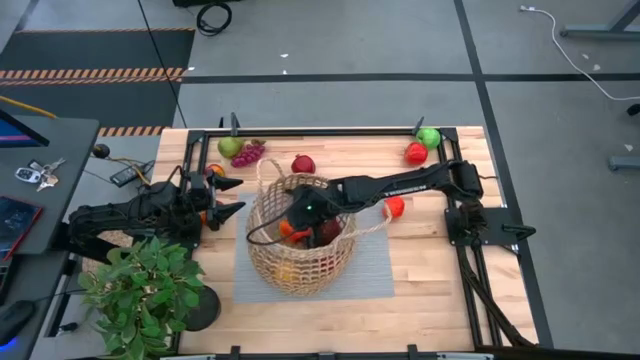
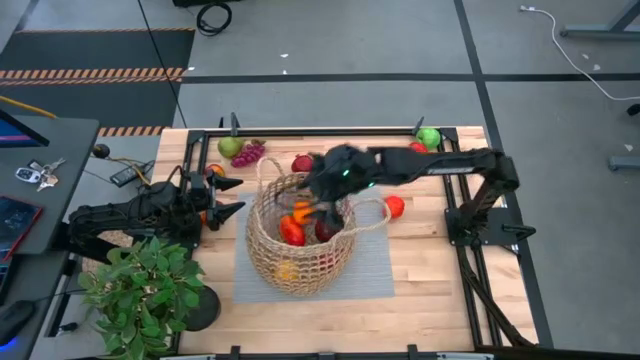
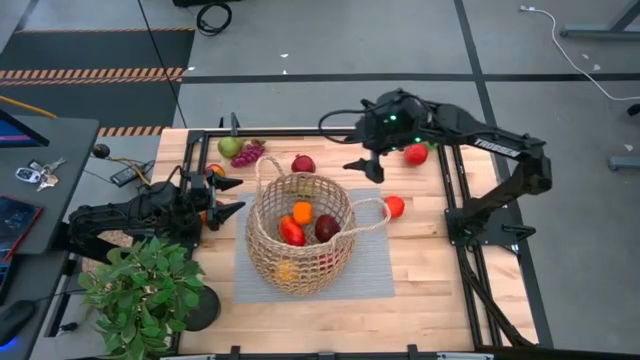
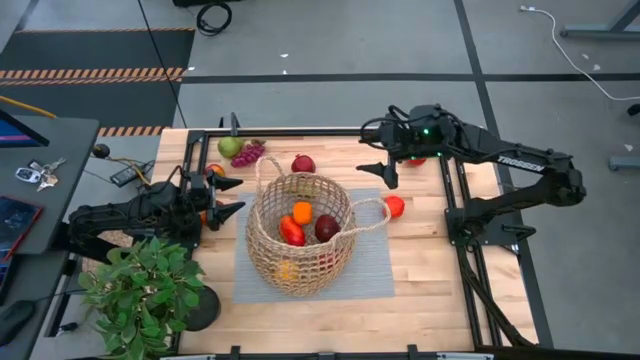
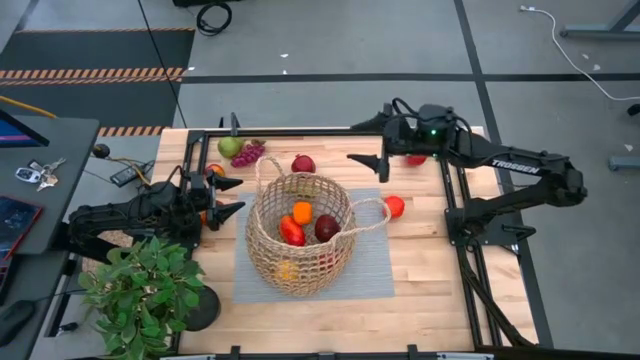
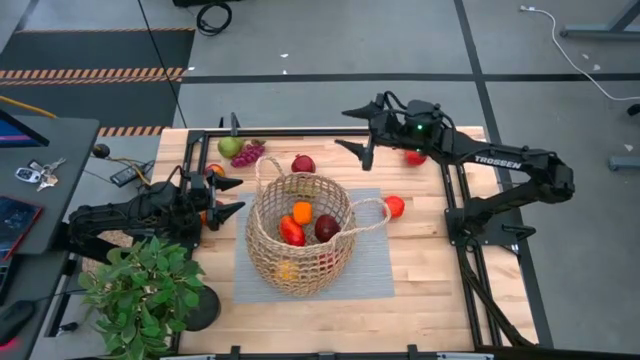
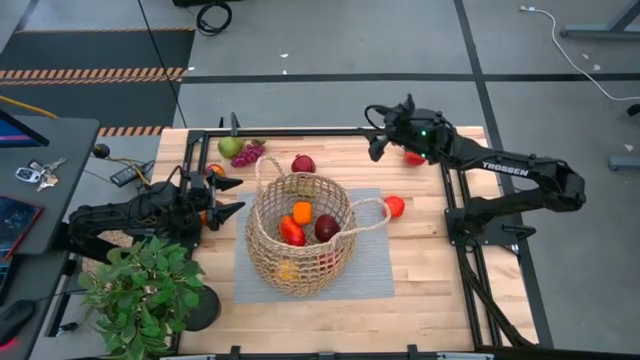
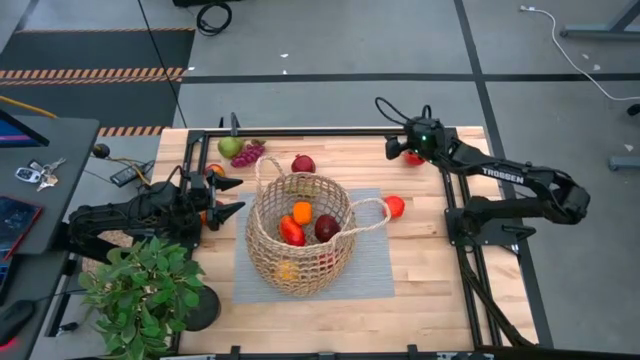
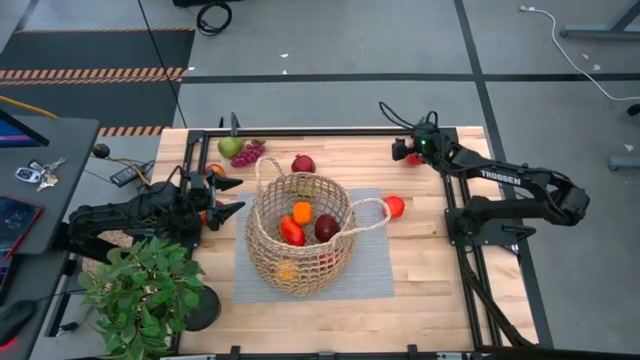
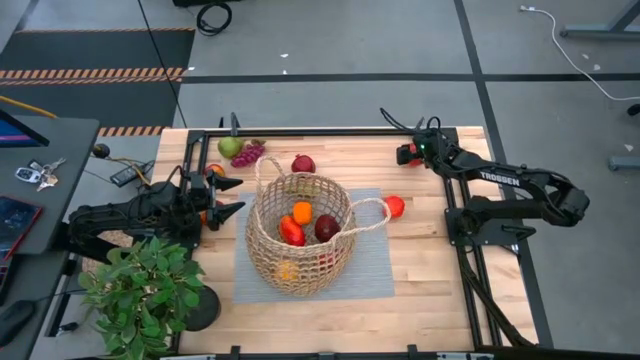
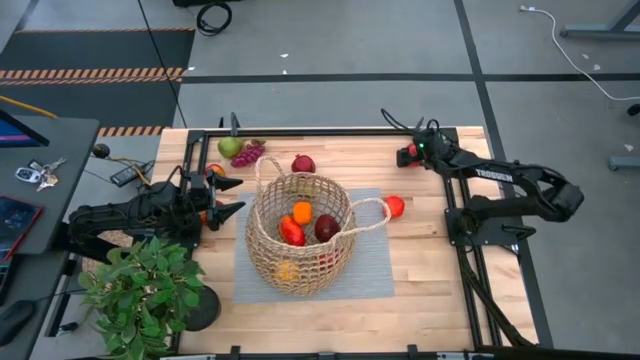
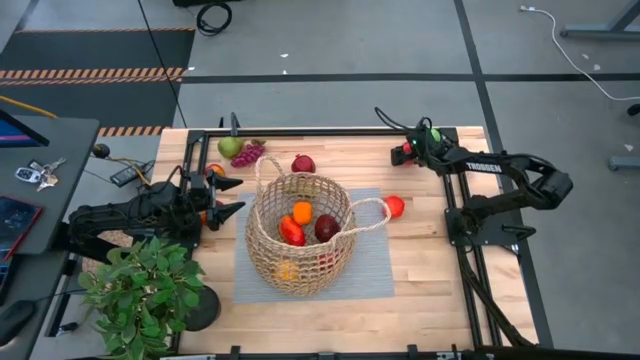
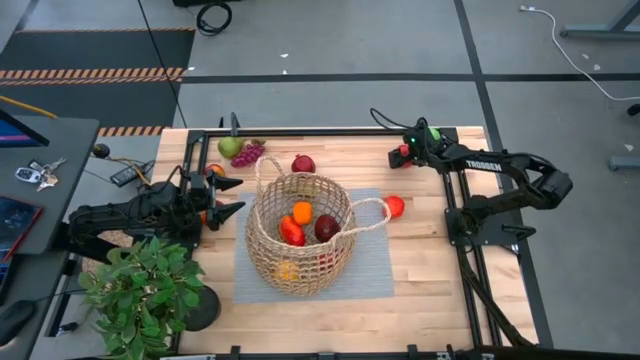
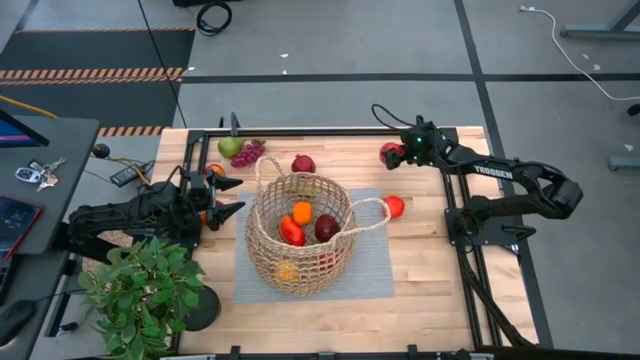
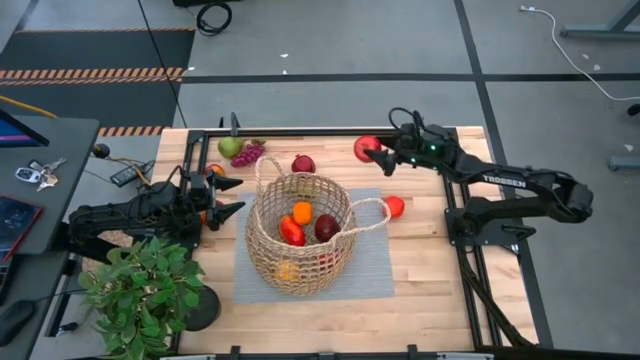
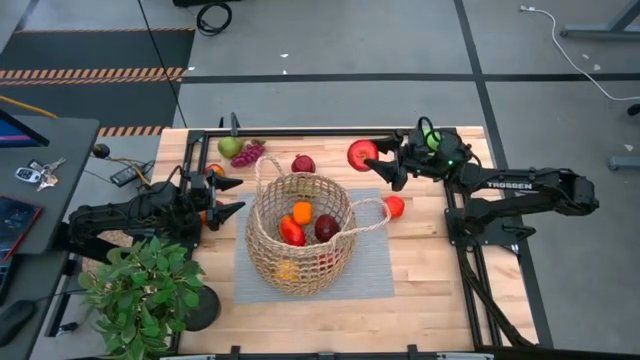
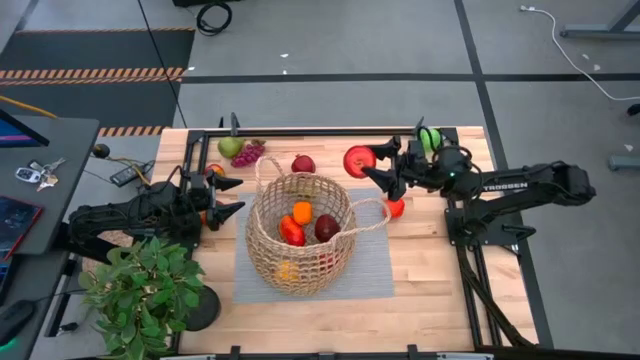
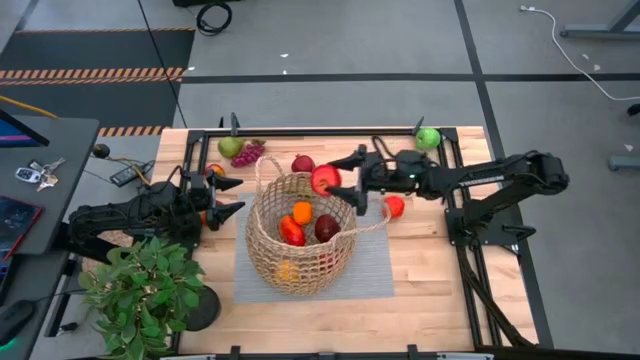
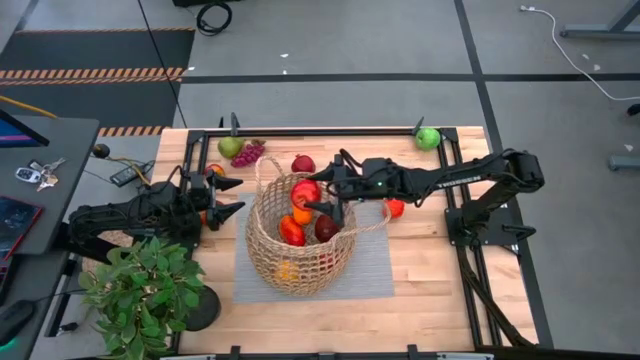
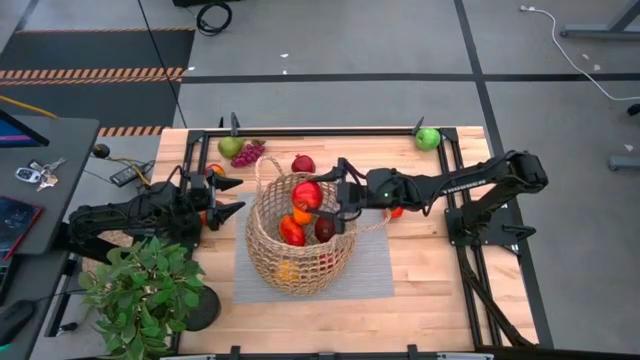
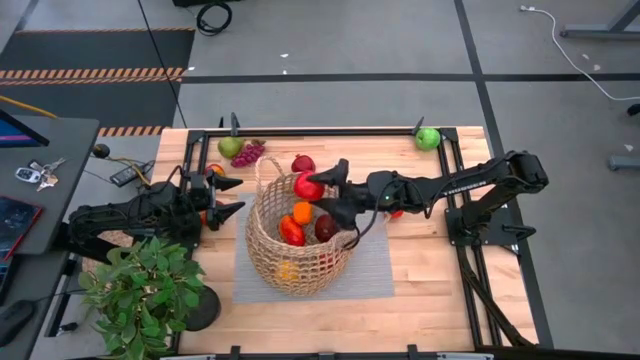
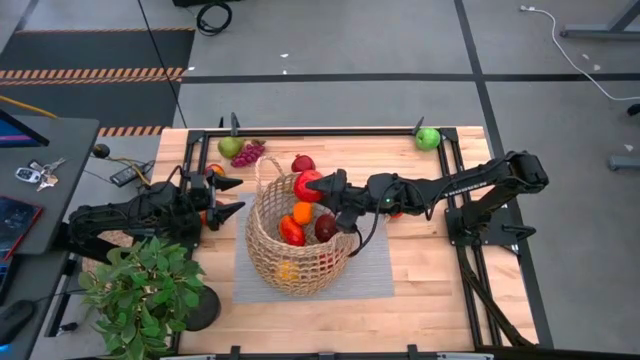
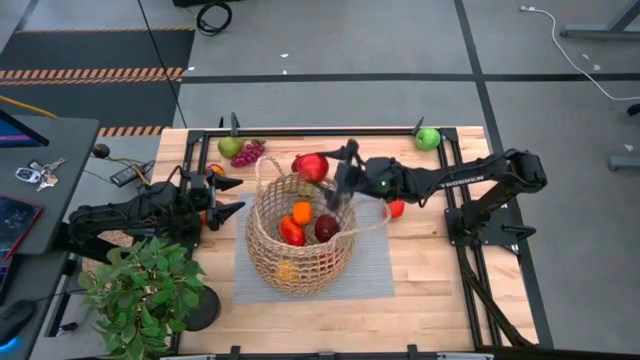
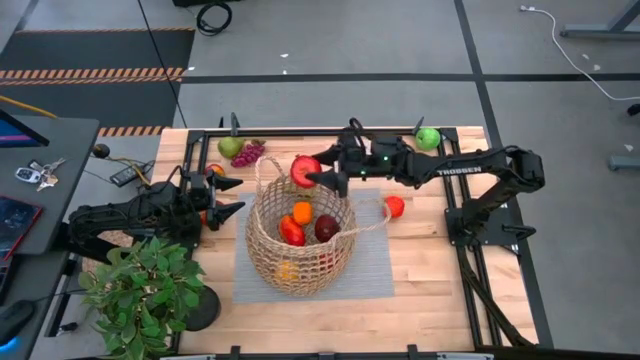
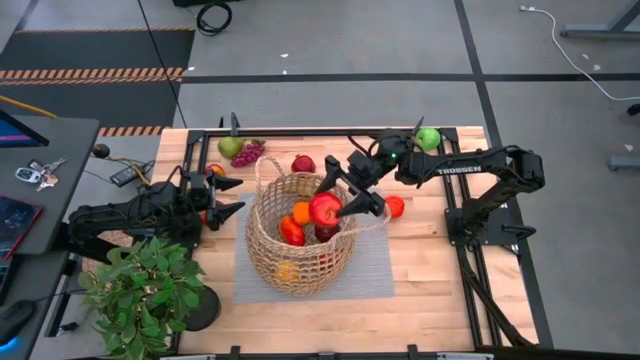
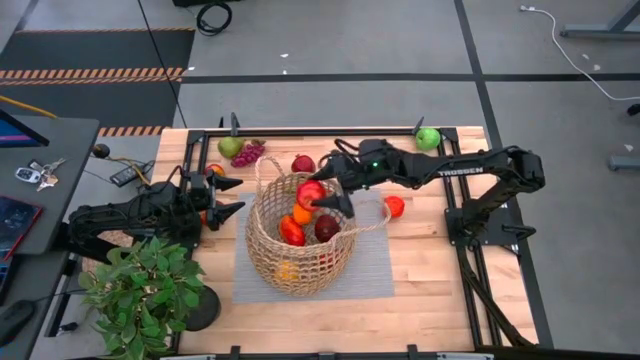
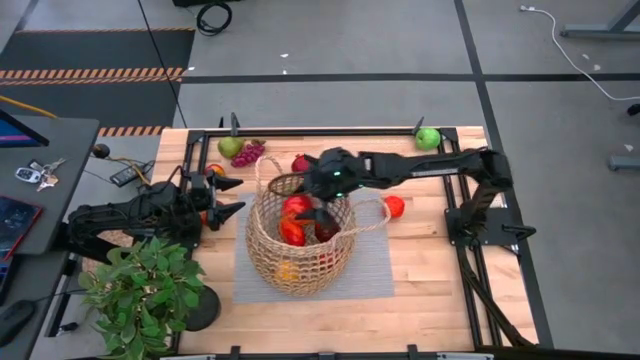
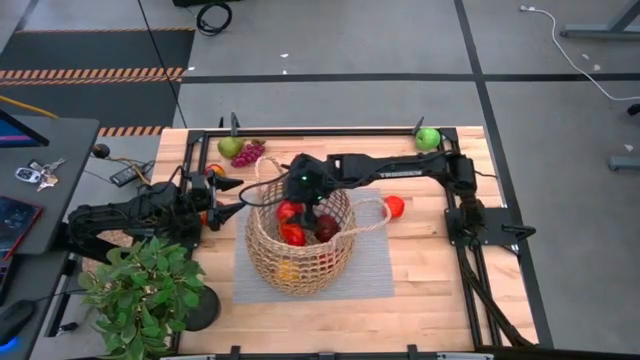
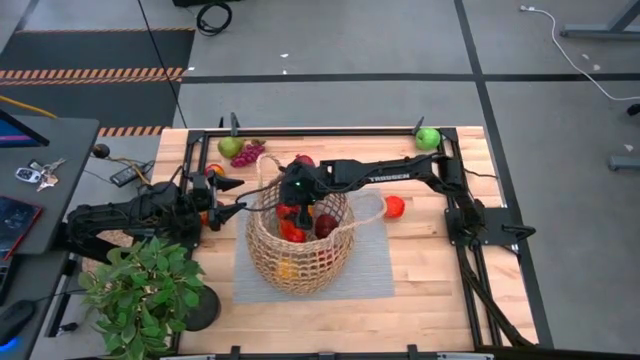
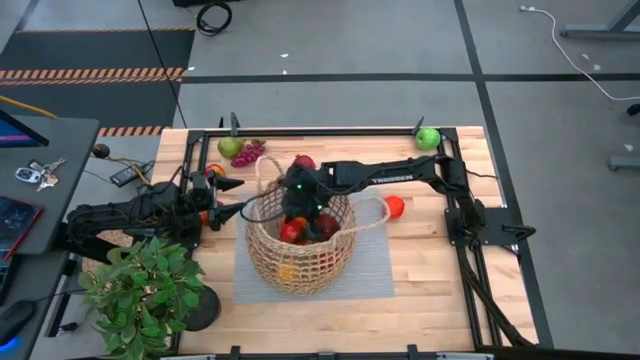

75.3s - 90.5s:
Task: Build produce basket
Put the red apple into the brown woven basket

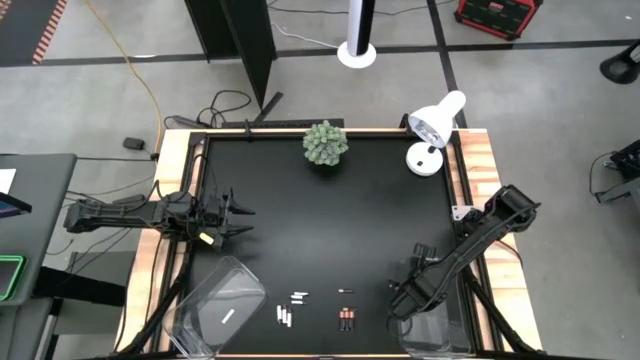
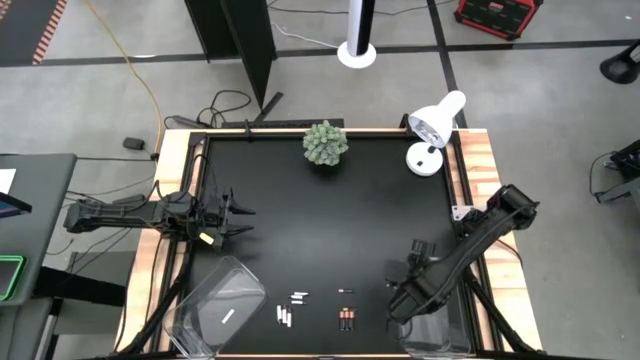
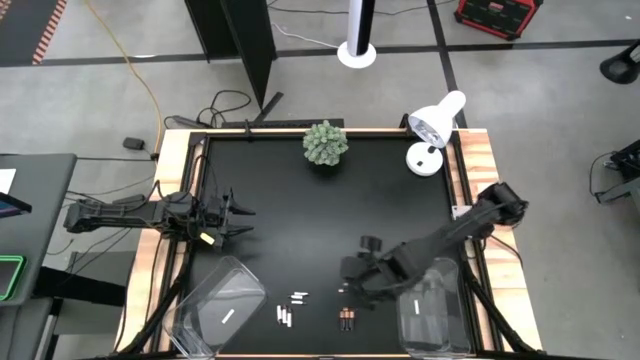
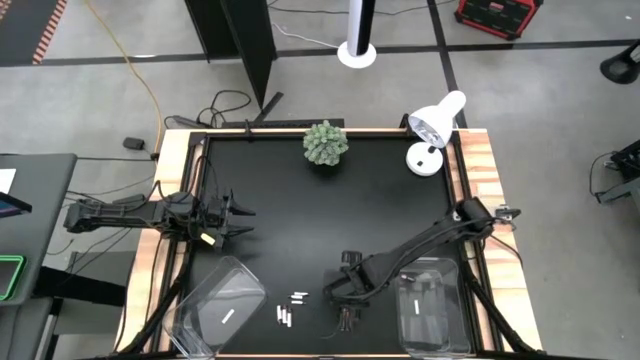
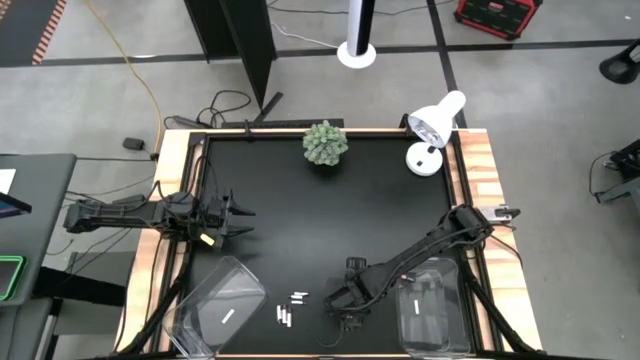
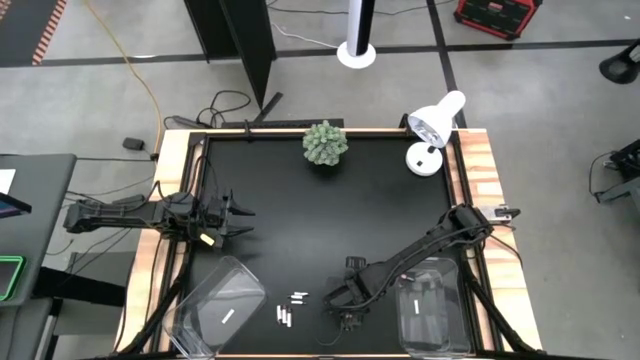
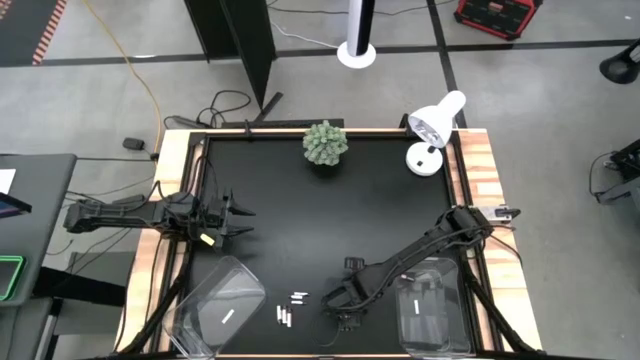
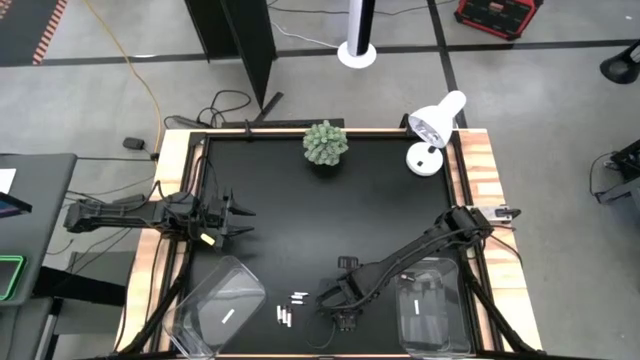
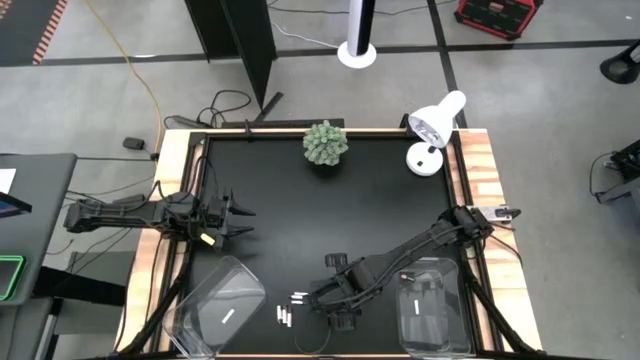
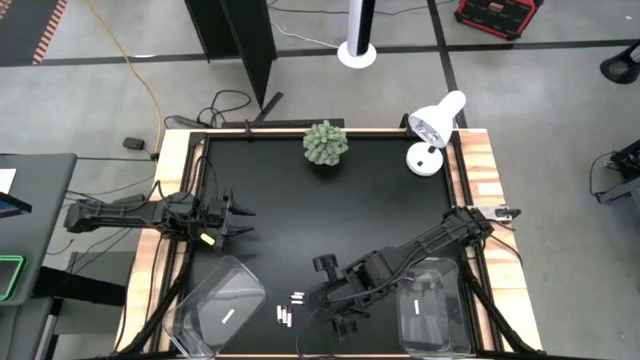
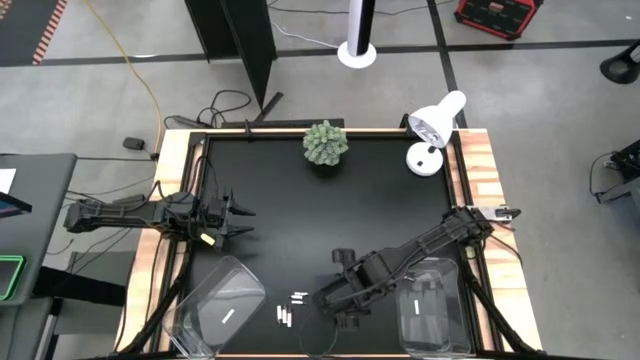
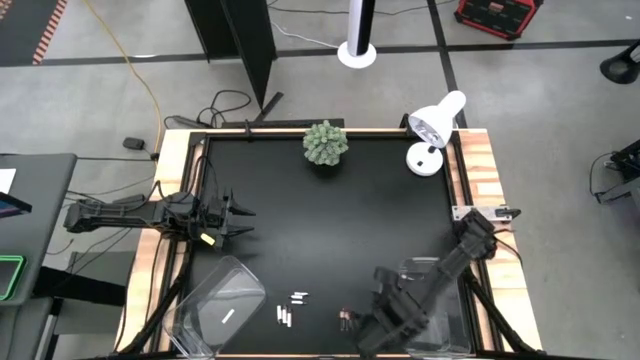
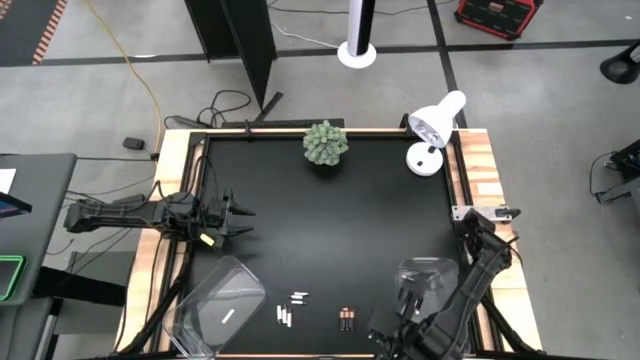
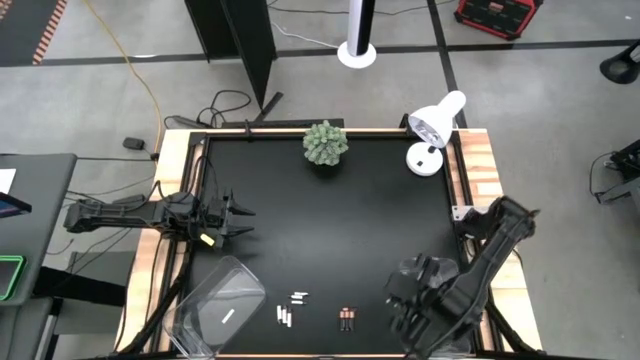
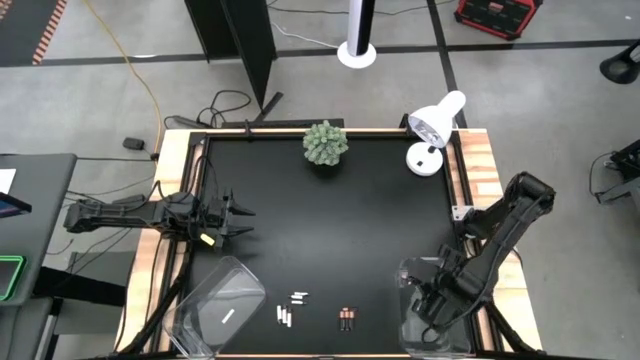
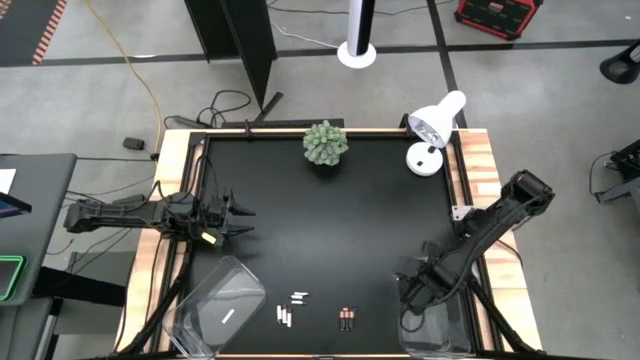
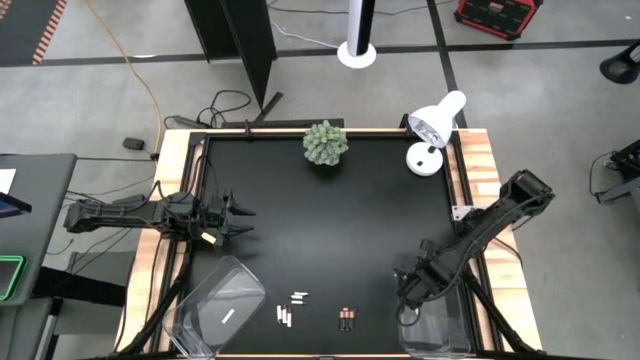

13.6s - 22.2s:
Task: Sort batteries
Put the black battery into the right transparent bin
